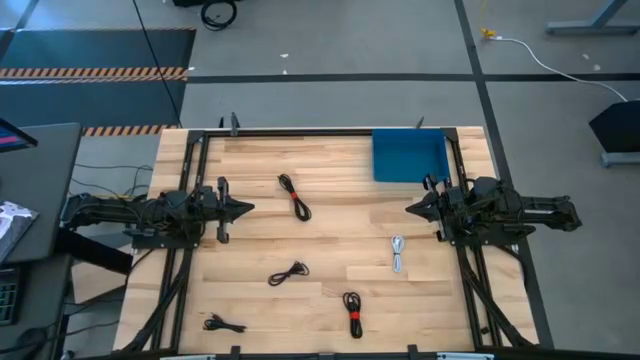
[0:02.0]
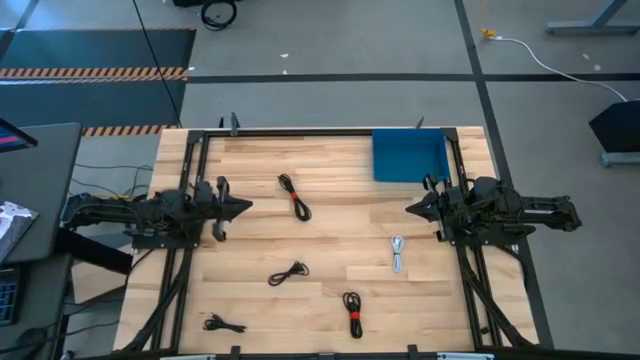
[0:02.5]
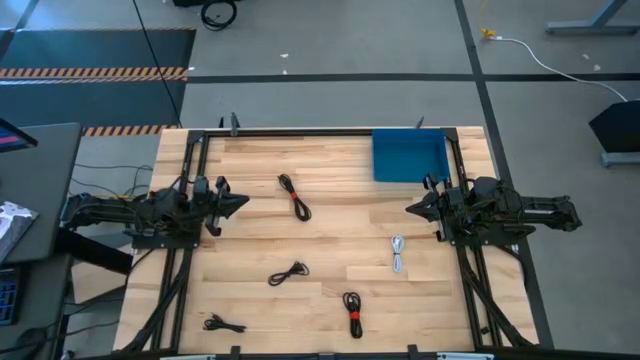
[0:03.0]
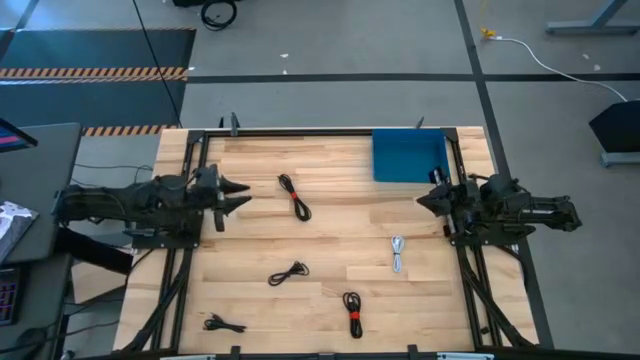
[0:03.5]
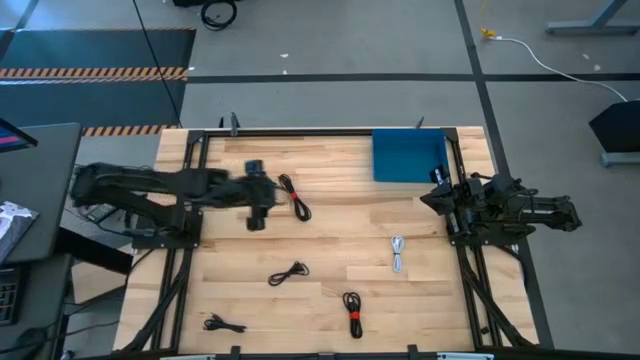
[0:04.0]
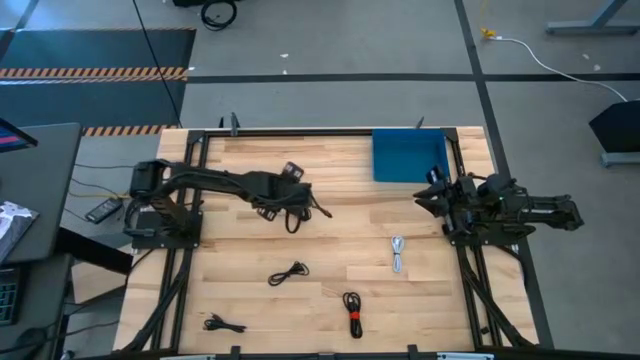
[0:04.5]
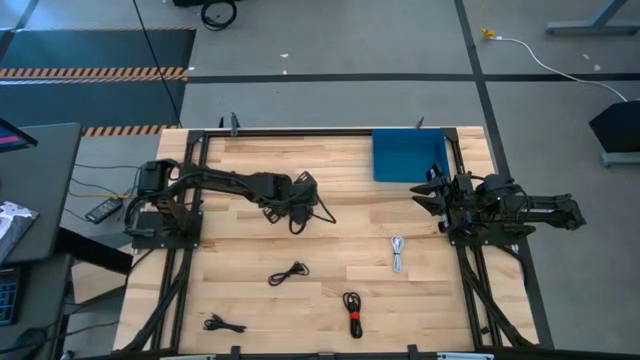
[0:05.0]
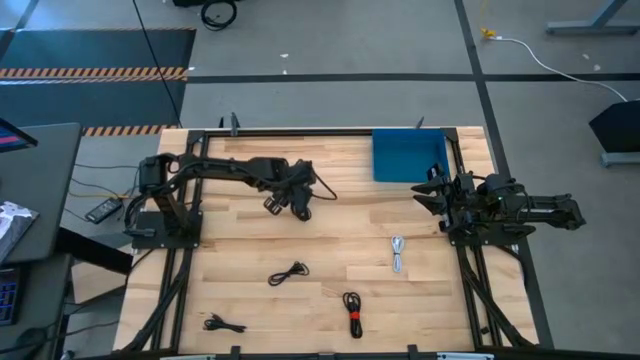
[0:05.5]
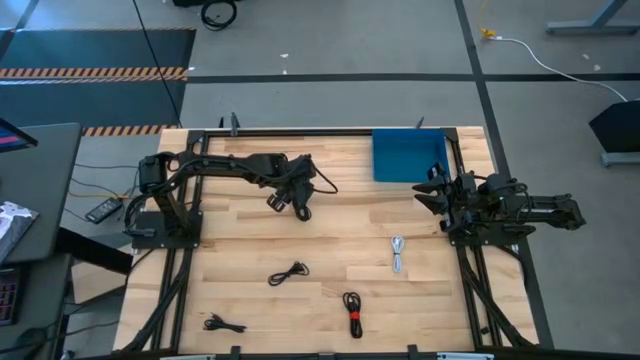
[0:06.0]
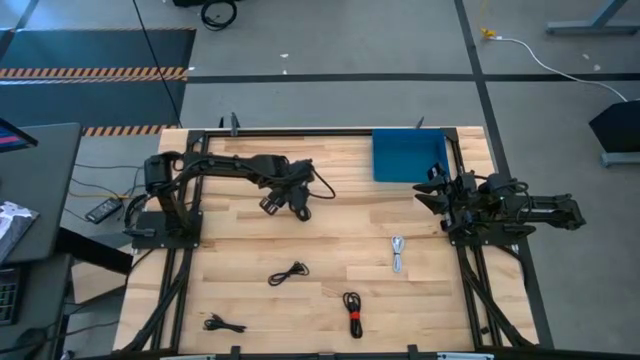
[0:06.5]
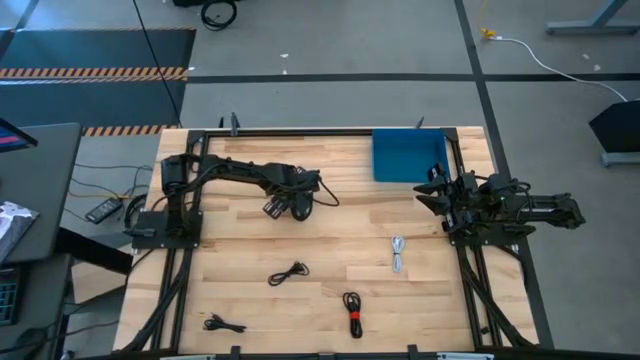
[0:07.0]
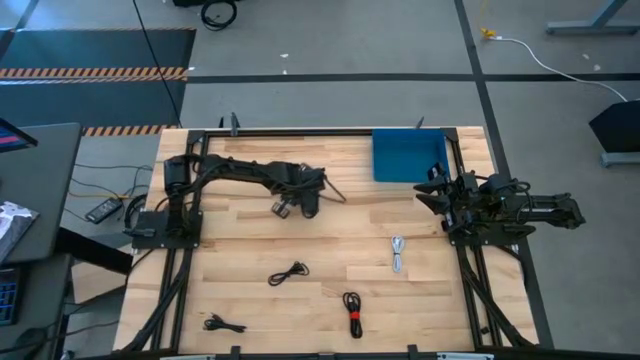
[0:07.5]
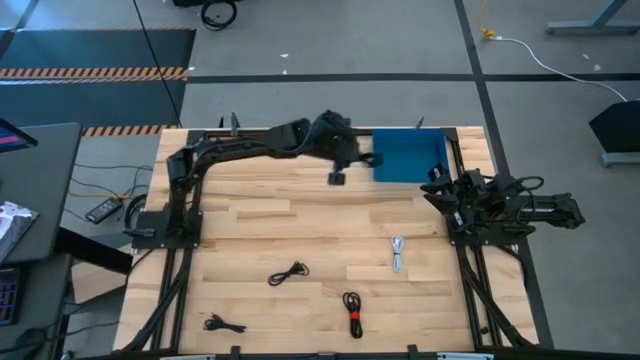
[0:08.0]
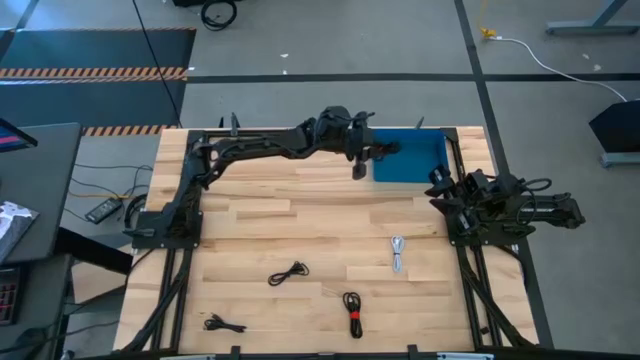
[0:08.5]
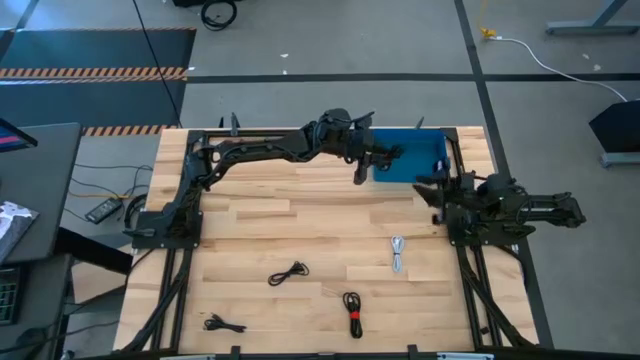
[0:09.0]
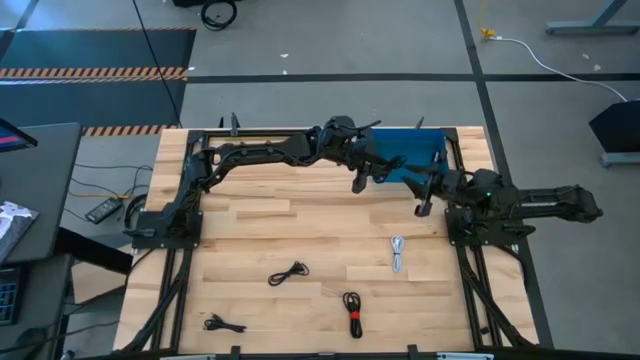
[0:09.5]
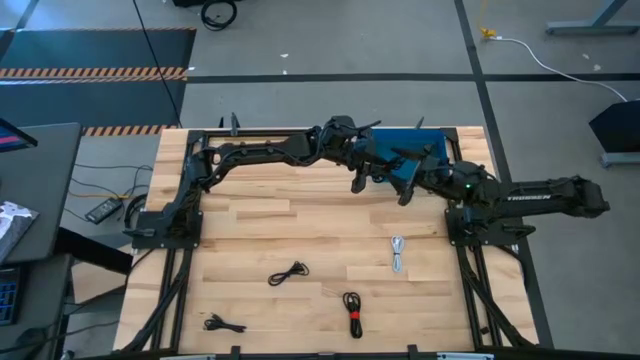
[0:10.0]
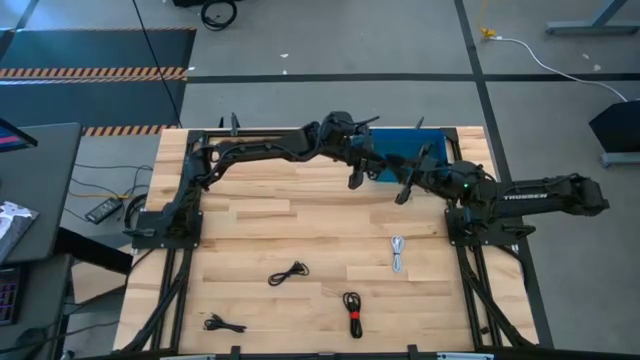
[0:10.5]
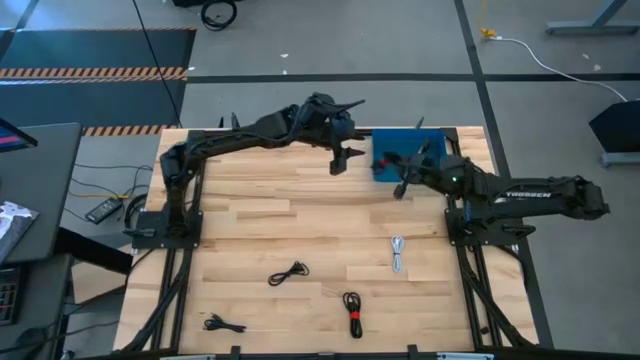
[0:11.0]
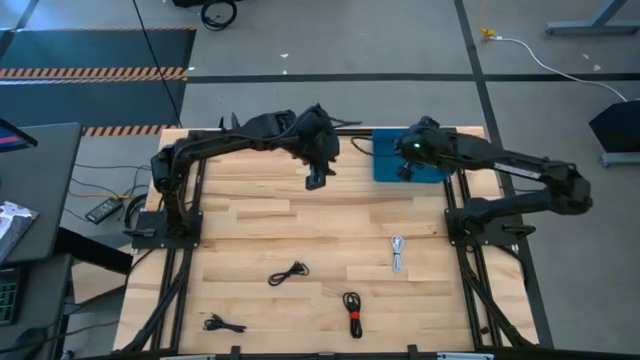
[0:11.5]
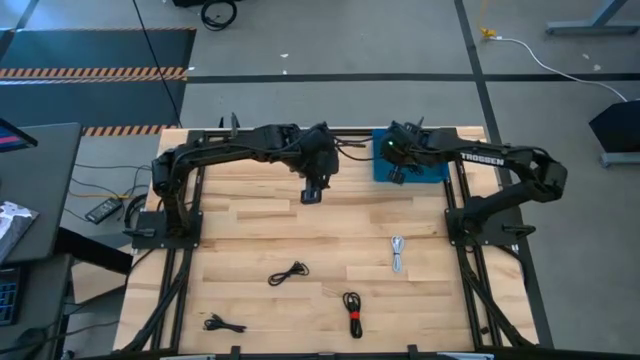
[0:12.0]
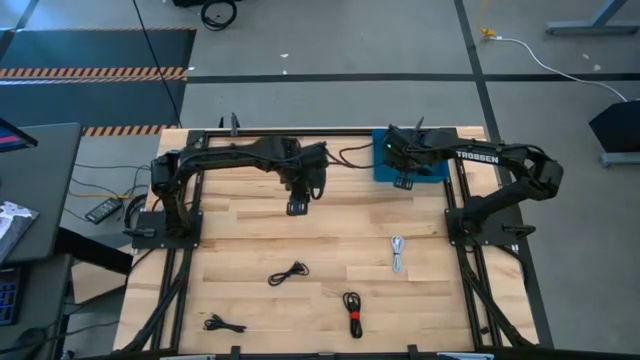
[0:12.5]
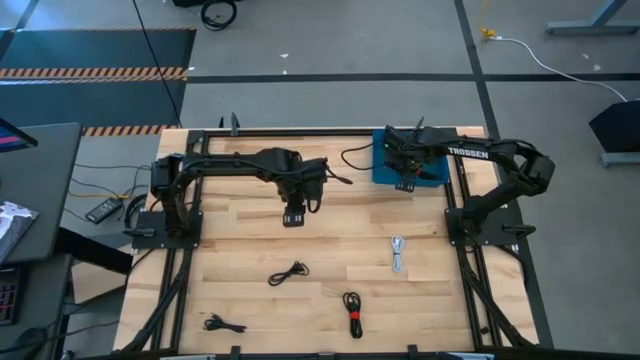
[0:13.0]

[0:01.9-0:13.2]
Task: Pick and place USB-C Cables
Put the black charger cable into the blue bin

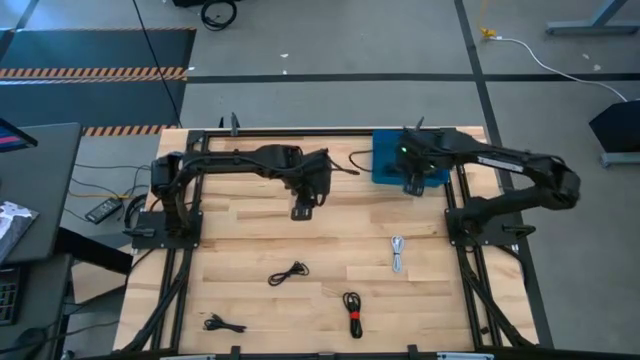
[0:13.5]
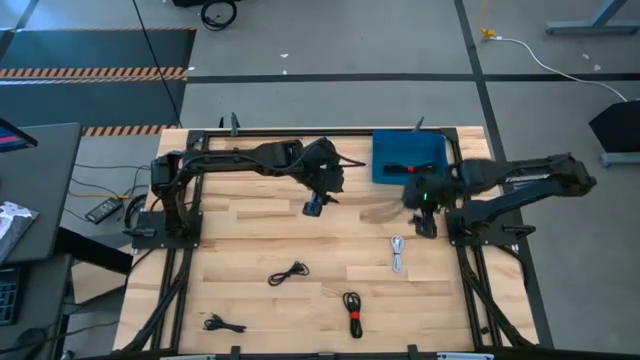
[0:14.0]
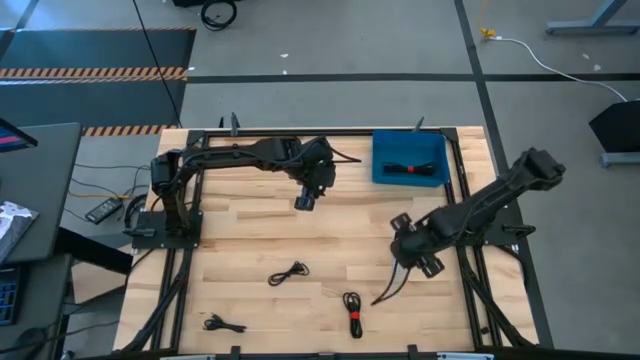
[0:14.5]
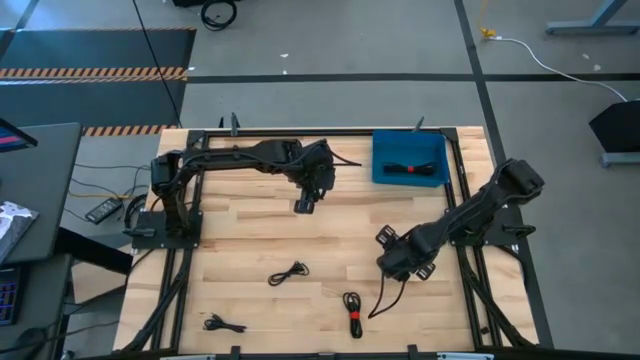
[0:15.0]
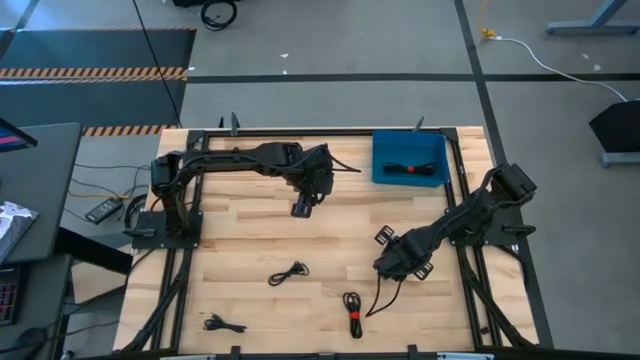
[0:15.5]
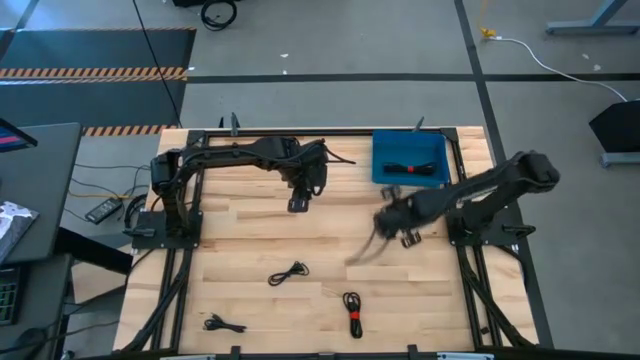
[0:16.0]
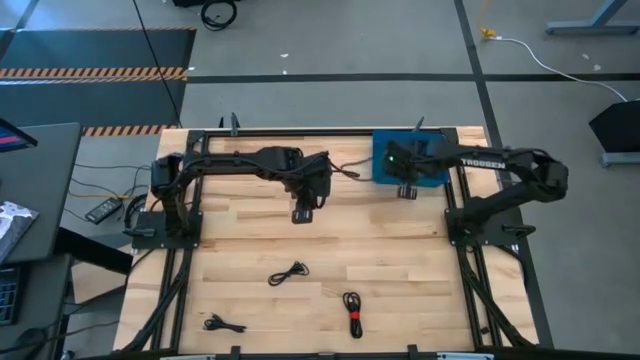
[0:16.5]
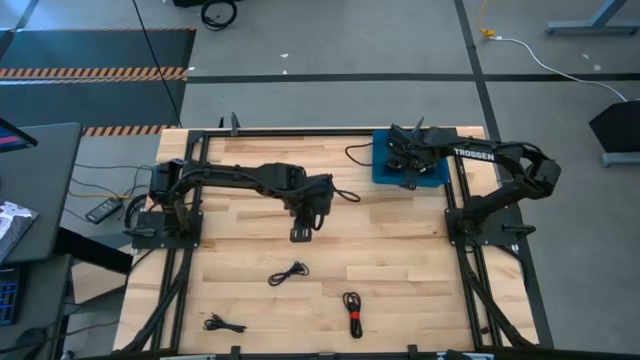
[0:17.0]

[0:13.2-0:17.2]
Put the white charger cable into the blue bin

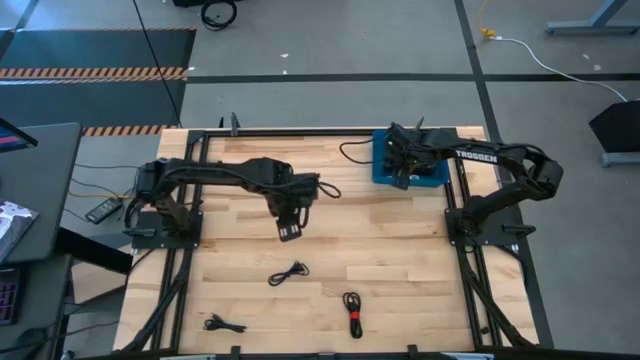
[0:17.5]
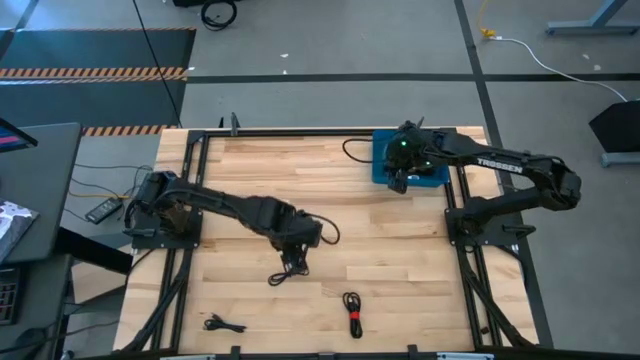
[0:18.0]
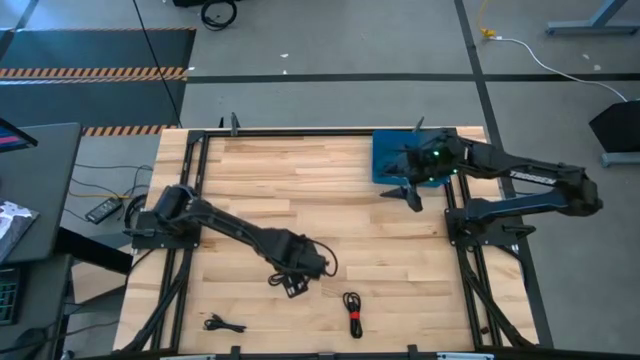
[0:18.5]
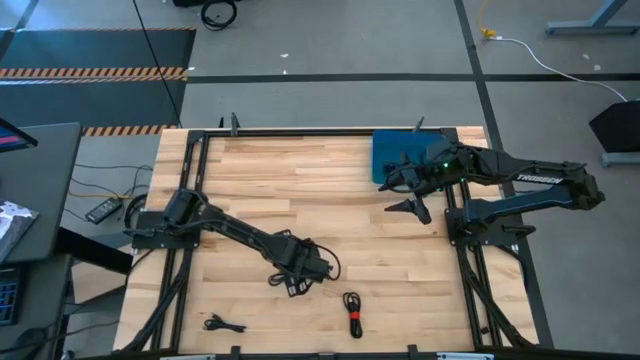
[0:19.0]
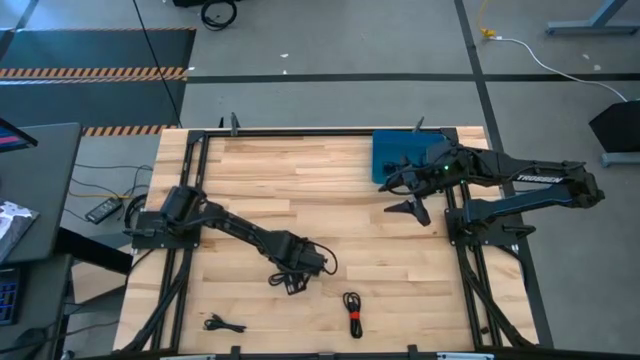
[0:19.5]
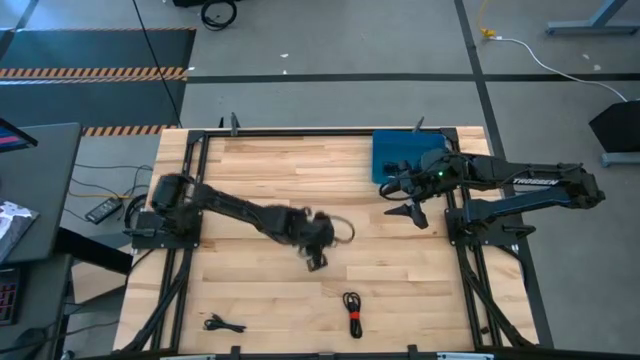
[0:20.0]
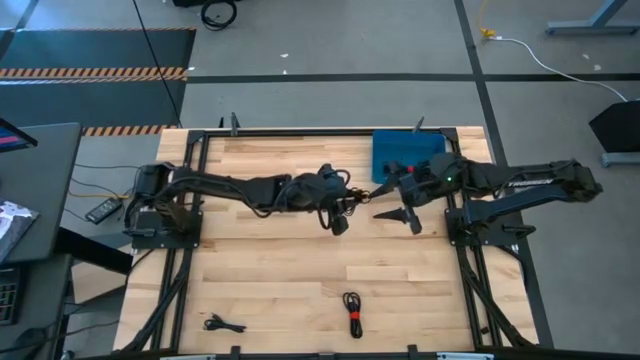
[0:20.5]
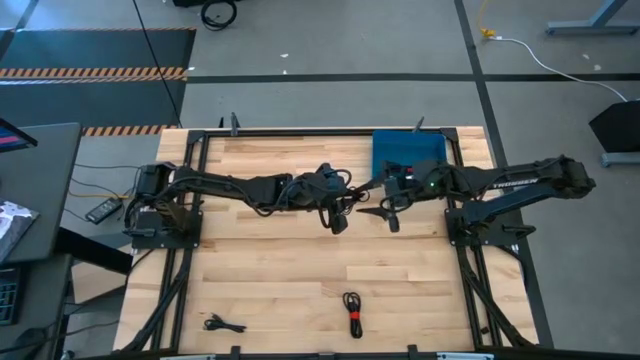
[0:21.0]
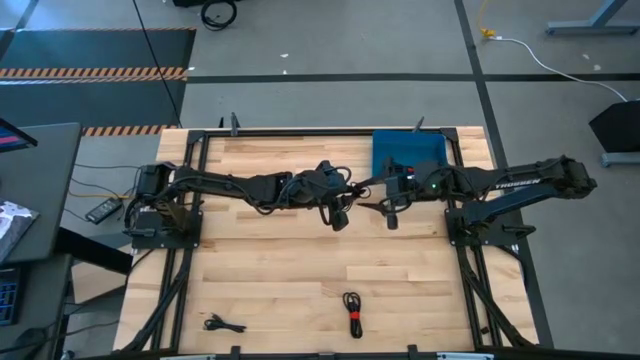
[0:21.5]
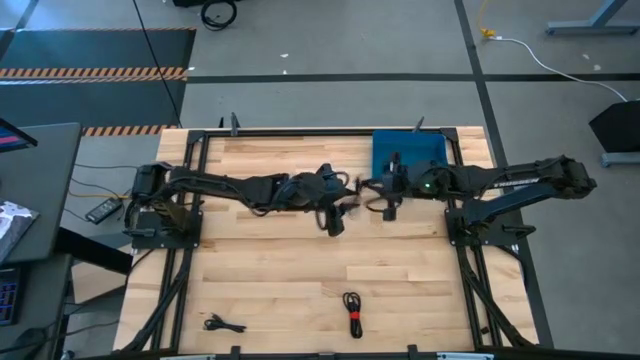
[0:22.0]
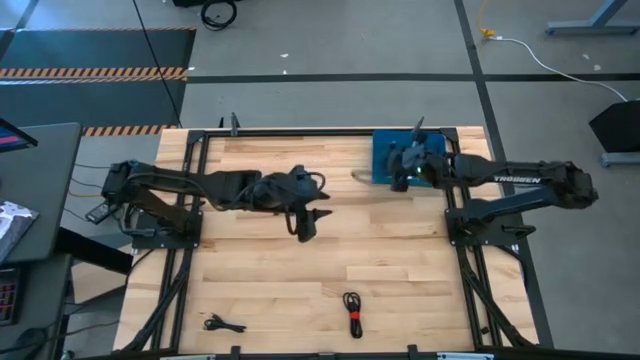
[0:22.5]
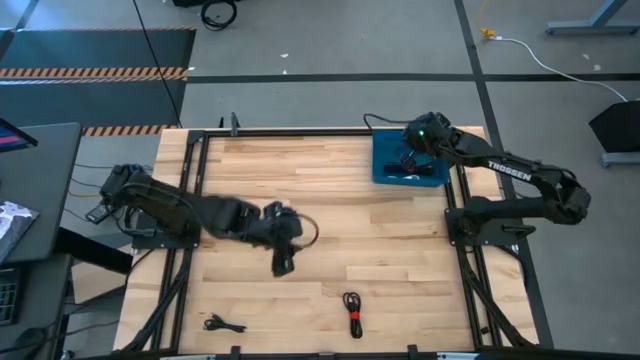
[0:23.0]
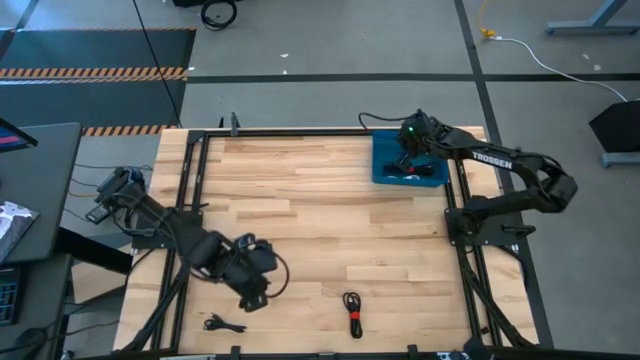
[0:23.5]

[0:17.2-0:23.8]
Put the black charger cable into the blue bin
